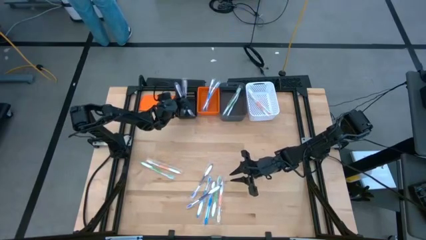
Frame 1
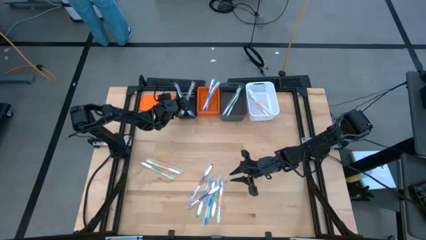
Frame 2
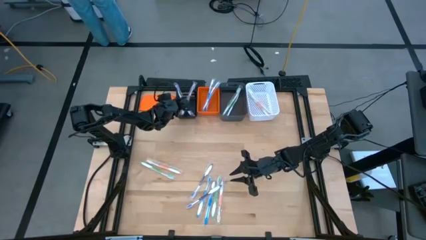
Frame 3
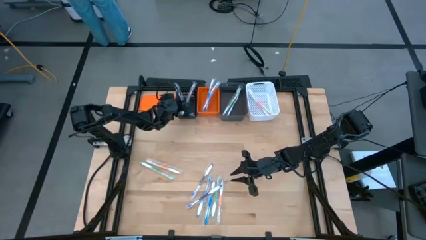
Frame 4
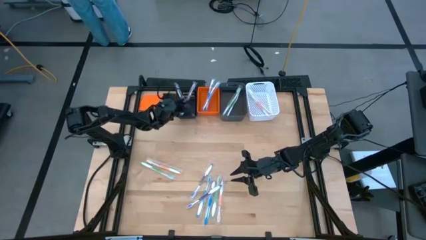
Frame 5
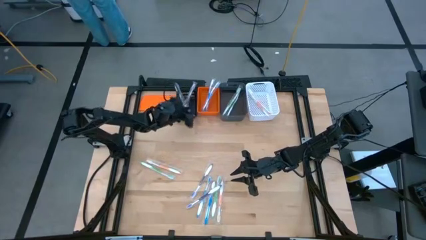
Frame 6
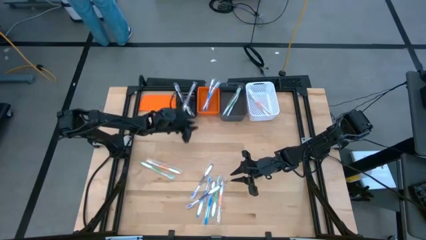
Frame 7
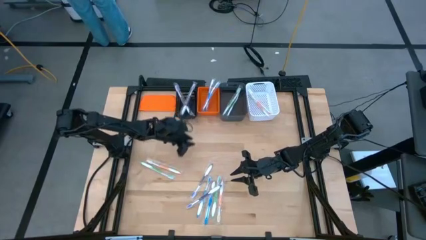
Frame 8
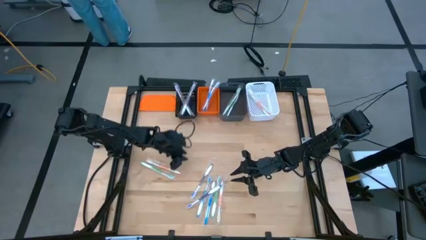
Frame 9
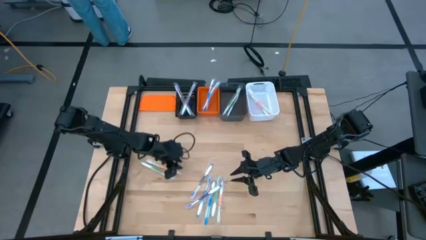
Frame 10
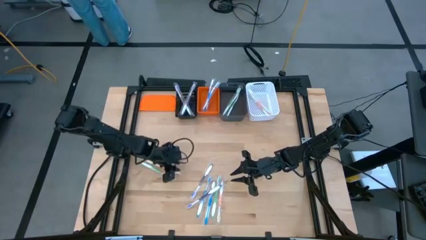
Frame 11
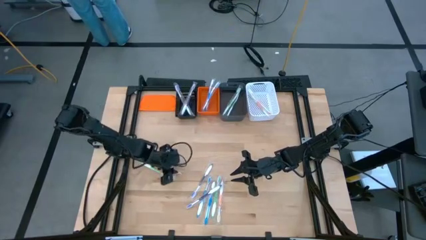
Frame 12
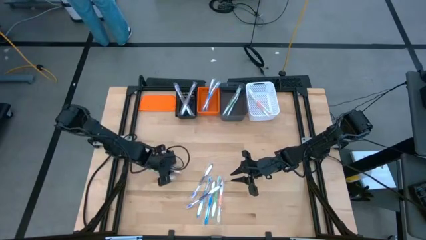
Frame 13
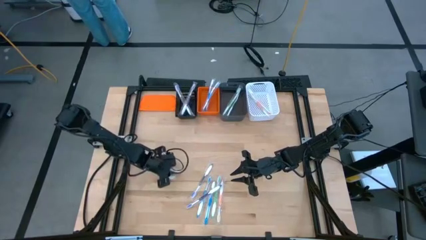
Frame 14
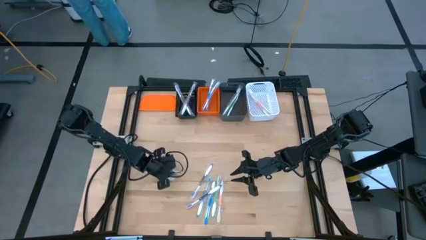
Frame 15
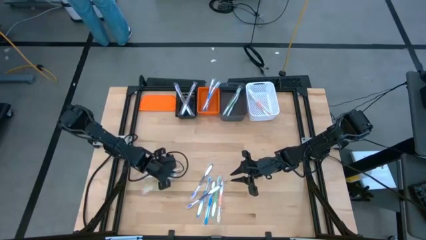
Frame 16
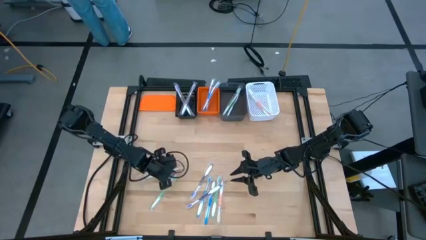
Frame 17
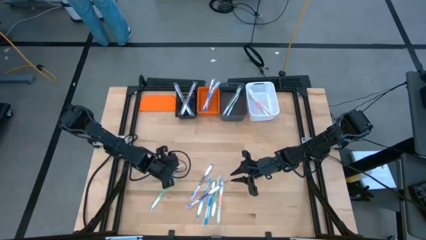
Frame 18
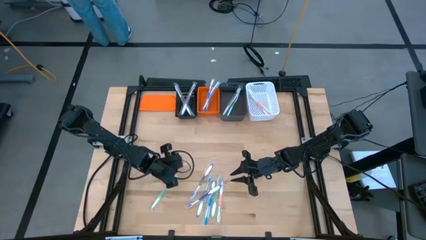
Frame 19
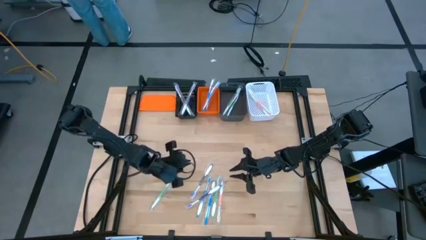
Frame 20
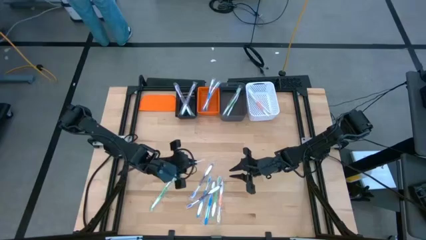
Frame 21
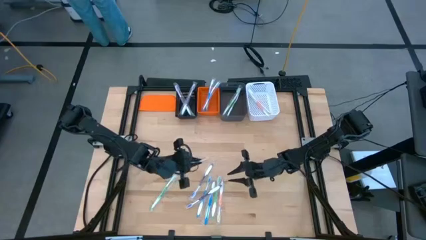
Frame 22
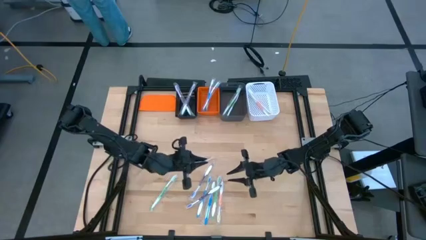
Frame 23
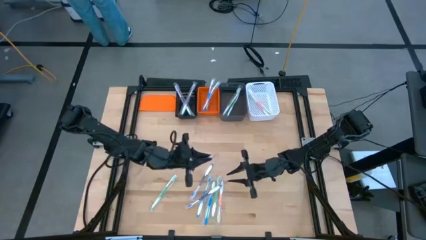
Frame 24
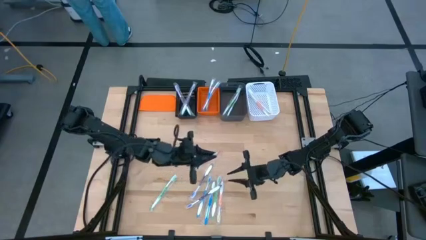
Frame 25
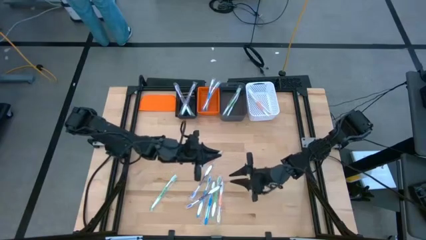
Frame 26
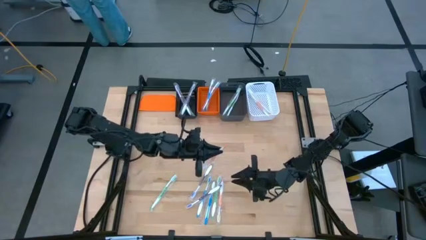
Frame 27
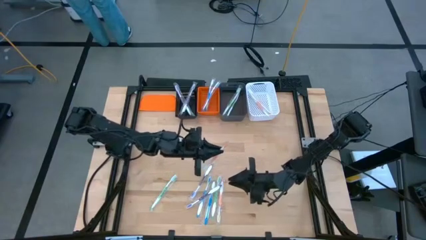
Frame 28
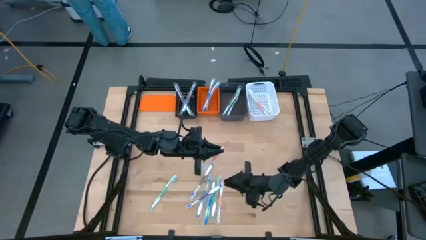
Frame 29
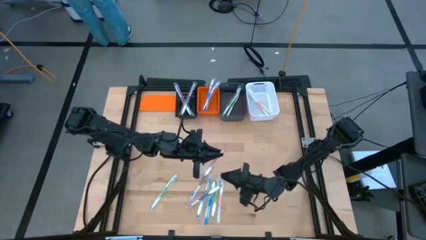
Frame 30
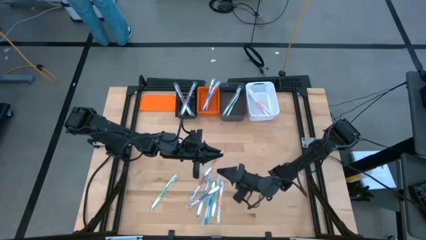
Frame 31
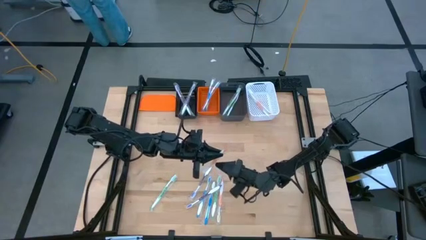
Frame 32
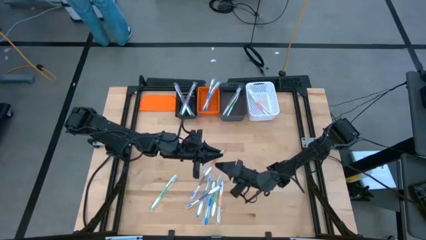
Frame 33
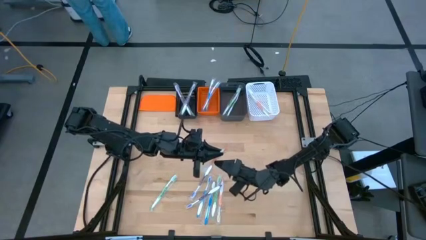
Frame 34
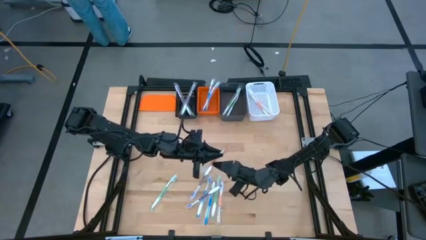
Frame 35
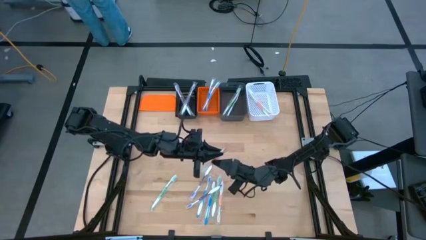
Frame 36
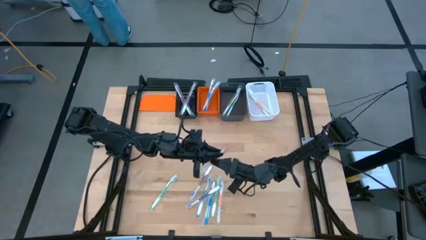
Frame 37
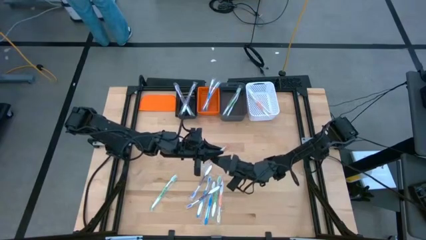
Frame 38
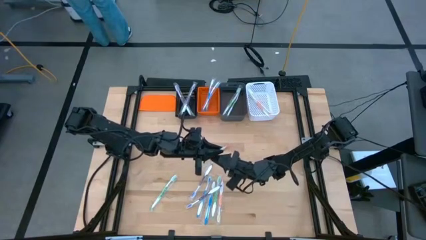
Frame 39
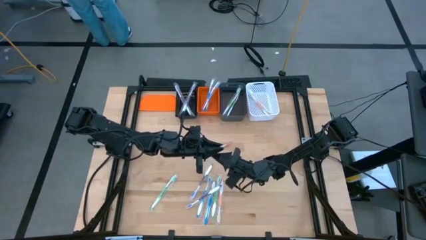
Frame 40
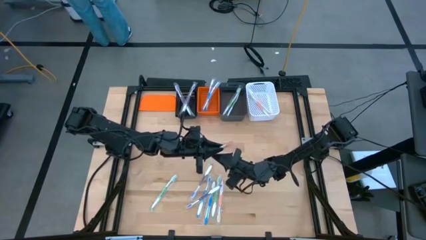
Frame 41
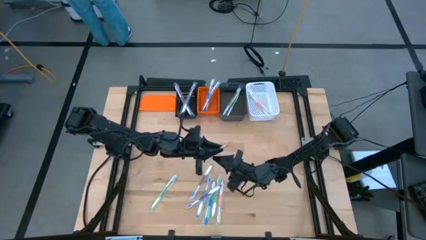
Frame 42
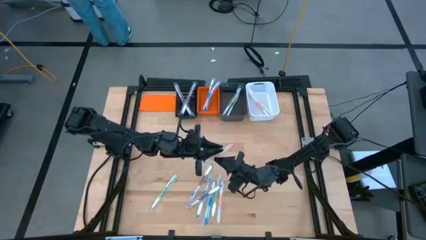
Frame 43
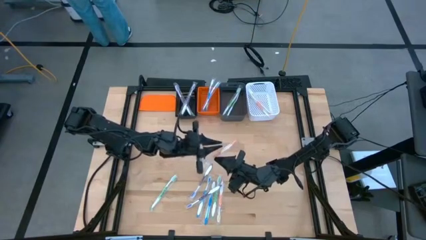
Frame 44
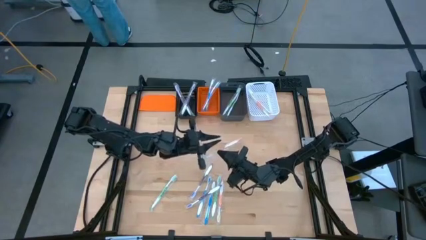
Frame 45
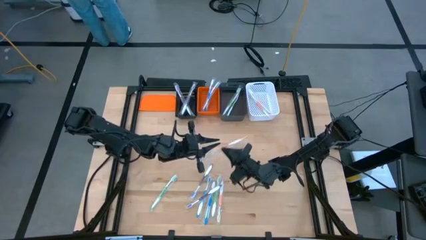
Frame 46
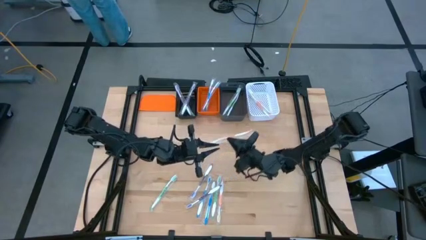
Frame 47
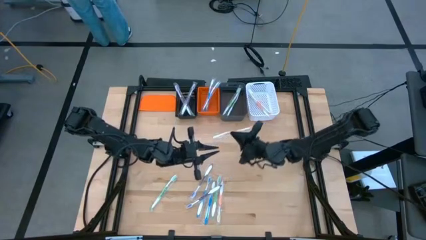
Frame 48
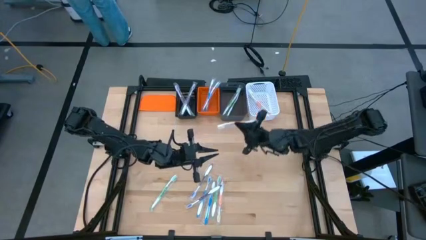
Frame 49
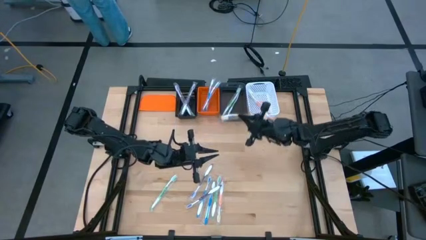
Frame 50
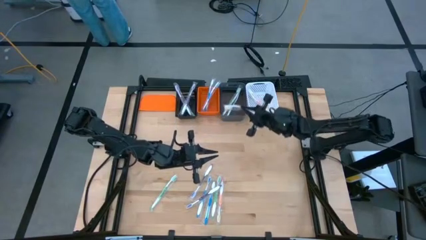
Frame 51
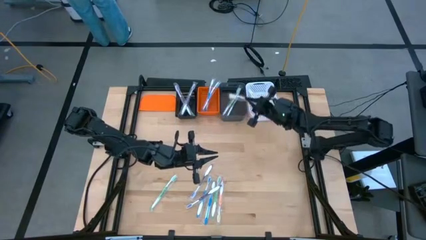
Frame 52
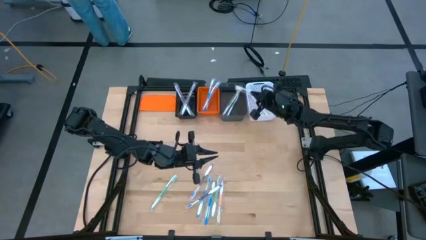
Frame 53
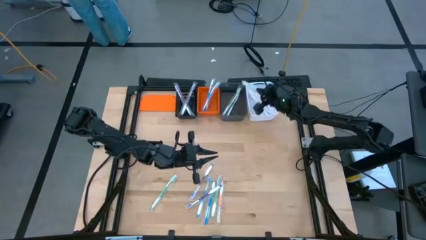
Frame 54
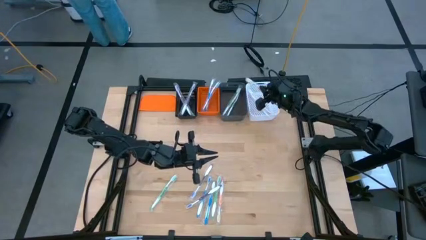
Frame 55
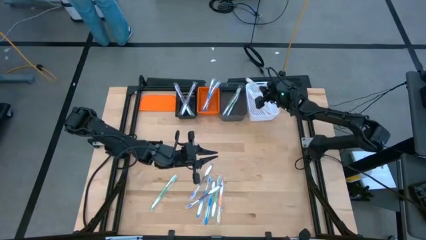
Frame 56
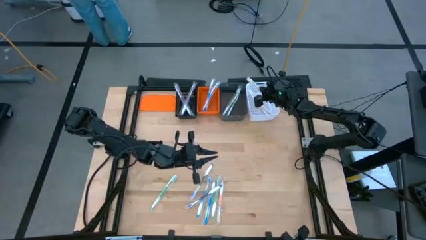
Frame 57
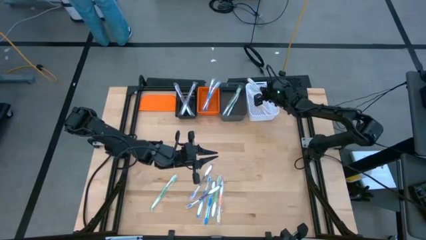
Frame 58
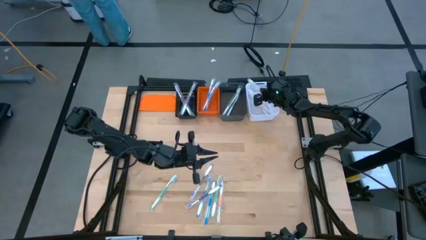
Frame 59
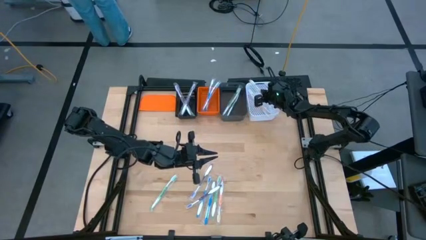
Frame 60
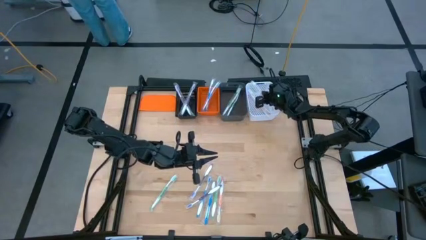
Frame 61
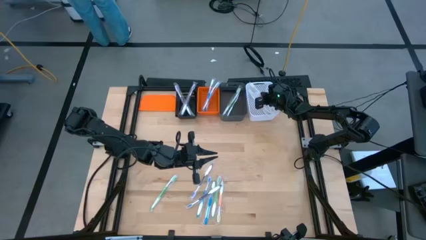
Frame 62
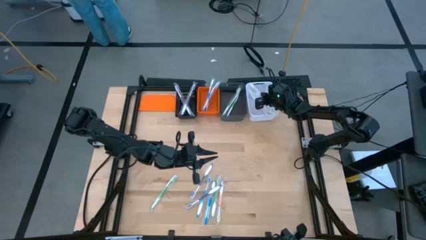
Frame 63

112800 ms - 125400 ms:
Task: Pick & Place Toothbrushes
Put the orange toothbrush into the white bin

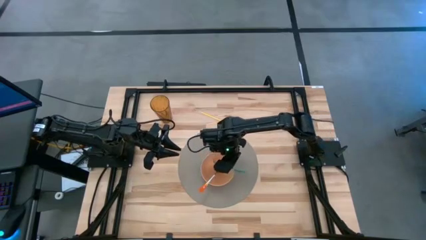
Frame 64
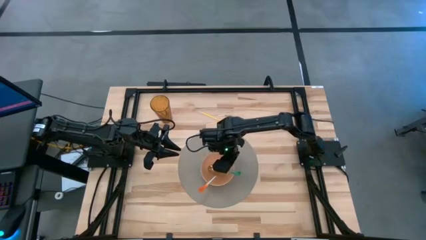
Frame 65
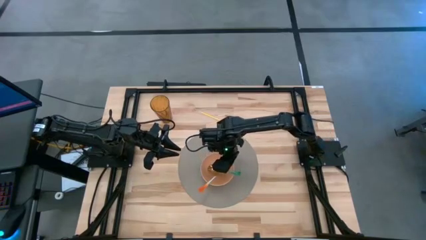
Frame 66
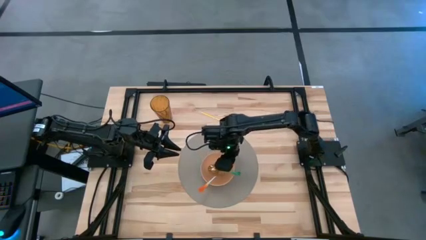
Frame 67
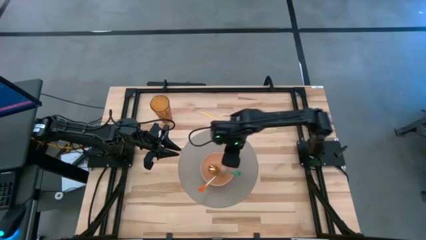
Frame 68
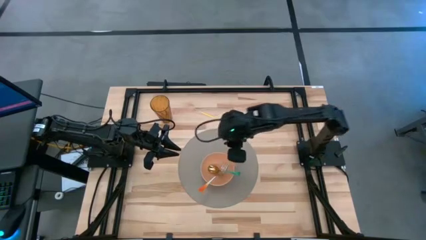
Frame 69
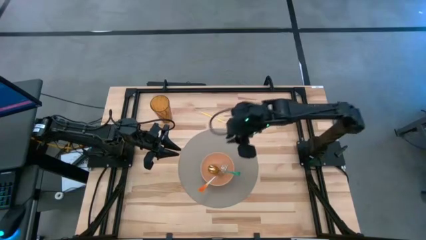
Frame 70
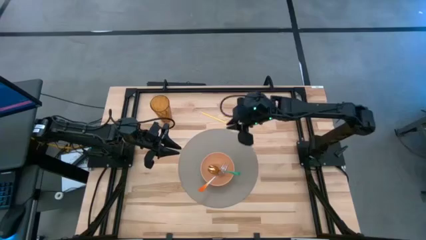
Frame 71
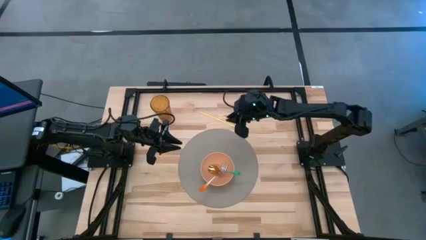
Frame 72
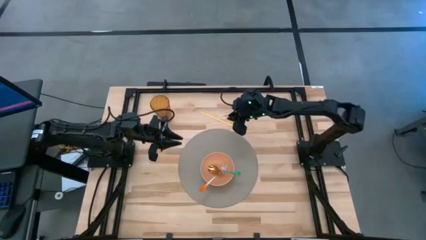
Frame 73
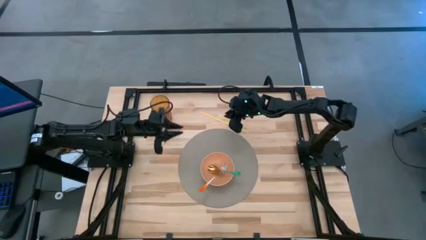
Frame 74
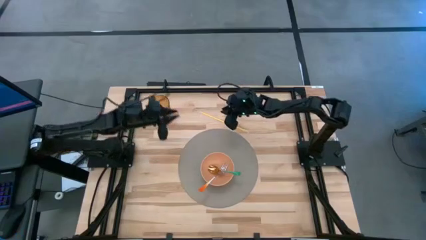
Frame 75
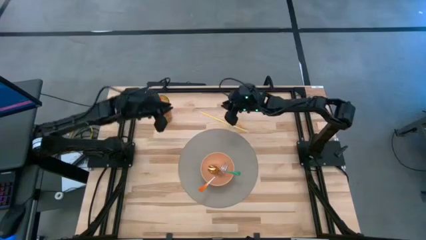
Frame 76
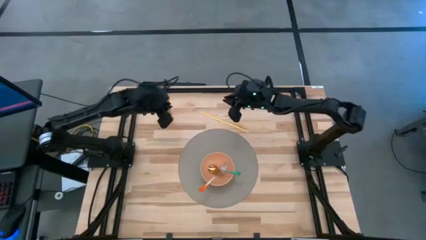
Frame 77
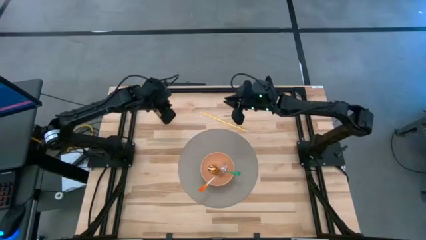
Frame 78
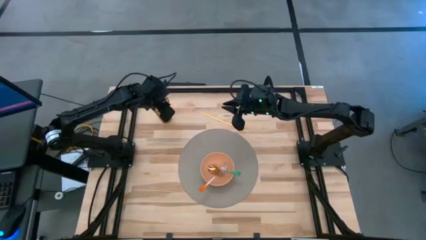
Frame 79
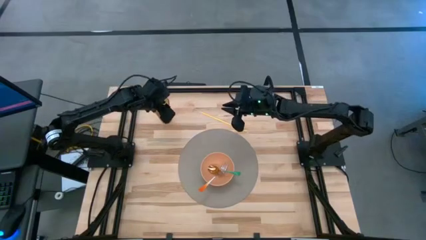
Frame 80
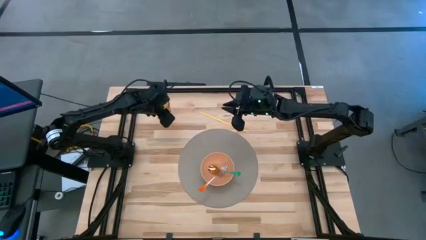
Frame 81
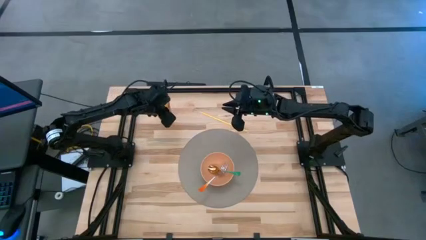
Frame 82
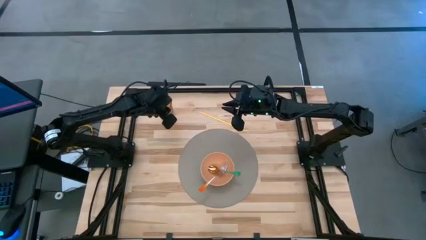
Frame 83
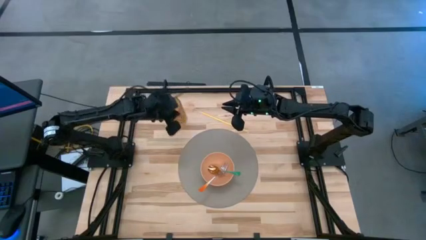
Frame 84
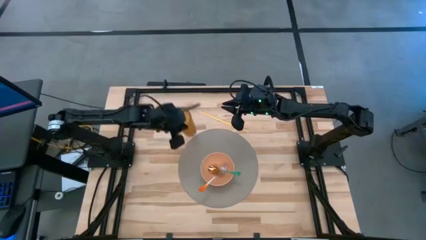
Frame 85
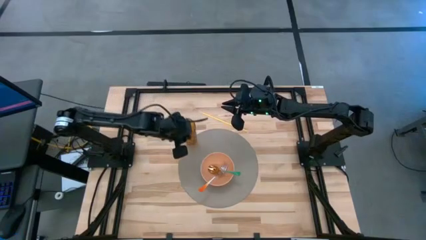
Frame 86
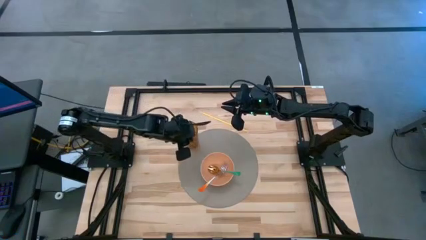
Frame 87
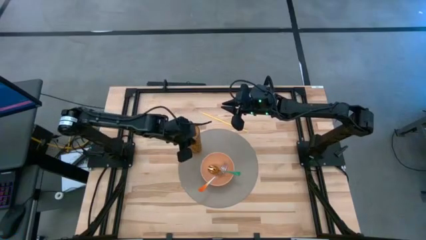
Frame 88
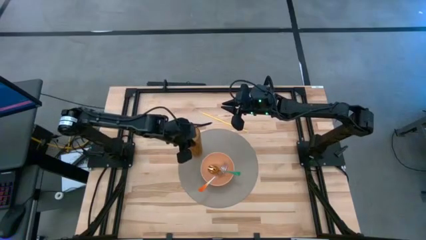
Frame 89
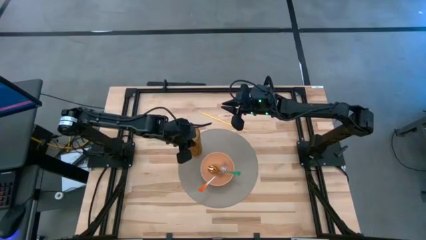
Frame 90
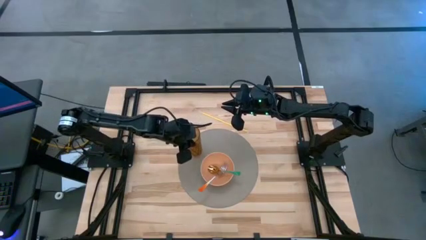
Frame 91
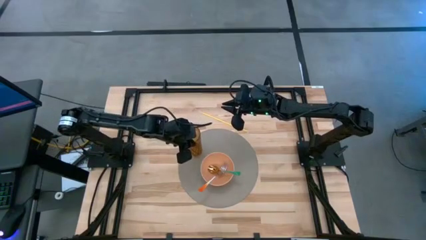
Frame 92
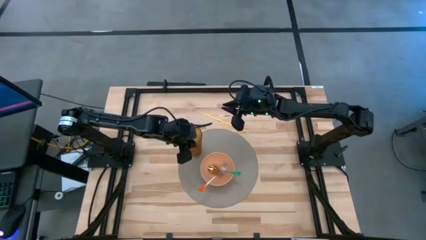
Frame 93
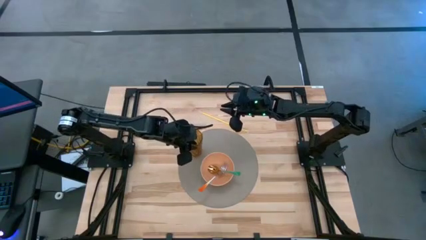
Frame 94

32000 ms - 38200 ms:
Task: Pick & Place Utensil
Put the brown cup on the gray table mat to the top left of the orange bowl
